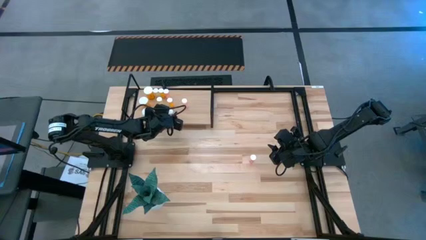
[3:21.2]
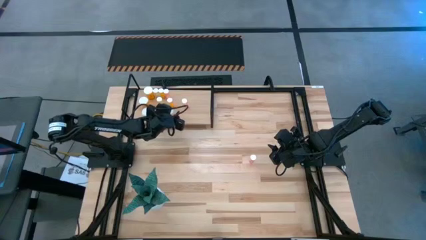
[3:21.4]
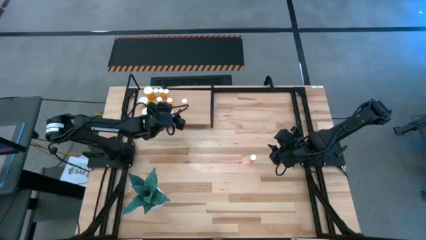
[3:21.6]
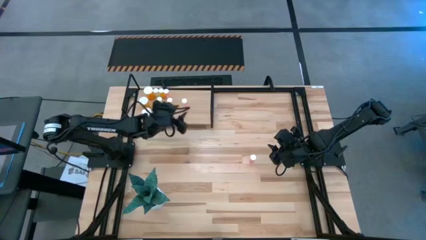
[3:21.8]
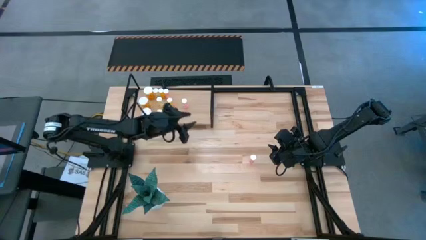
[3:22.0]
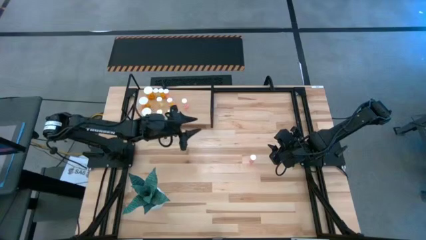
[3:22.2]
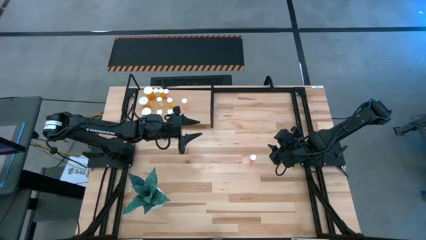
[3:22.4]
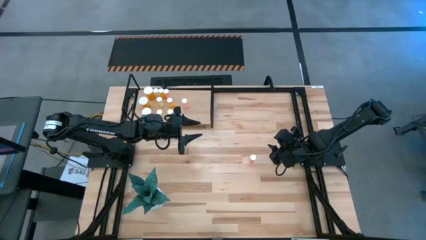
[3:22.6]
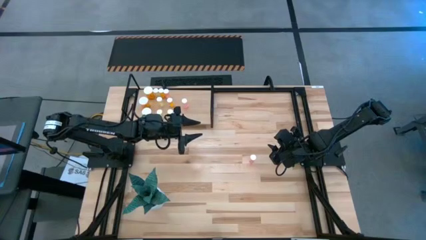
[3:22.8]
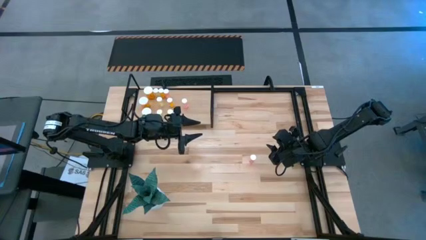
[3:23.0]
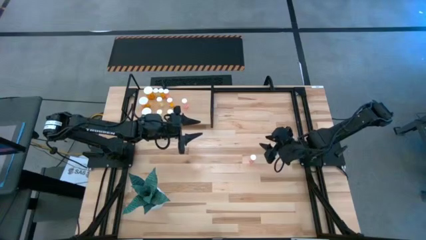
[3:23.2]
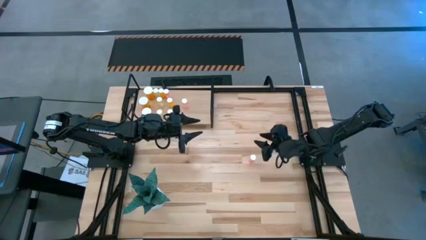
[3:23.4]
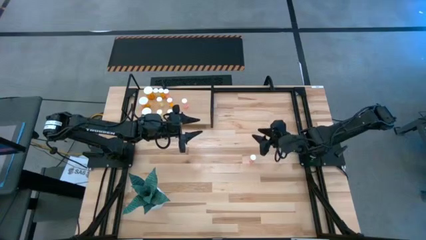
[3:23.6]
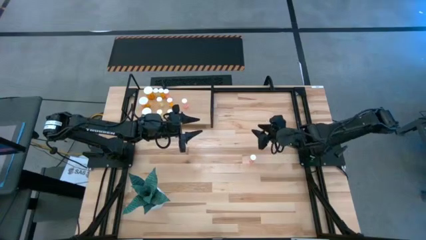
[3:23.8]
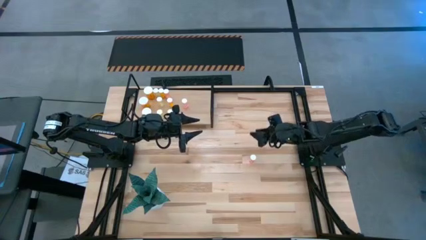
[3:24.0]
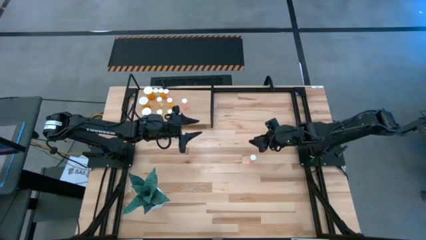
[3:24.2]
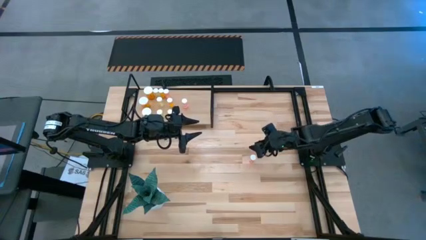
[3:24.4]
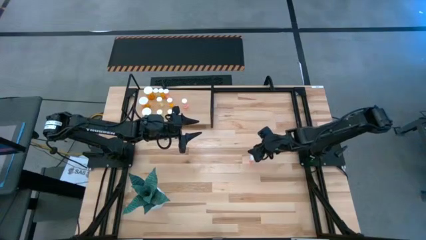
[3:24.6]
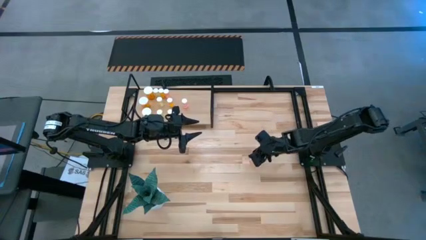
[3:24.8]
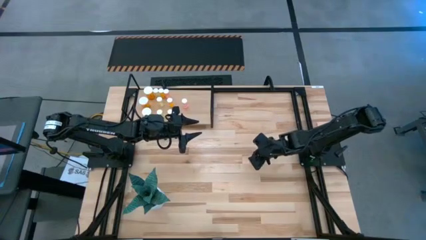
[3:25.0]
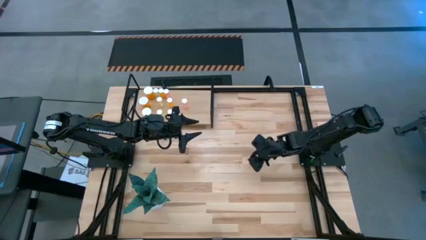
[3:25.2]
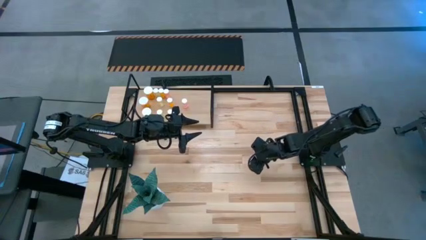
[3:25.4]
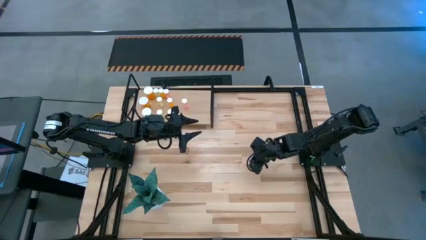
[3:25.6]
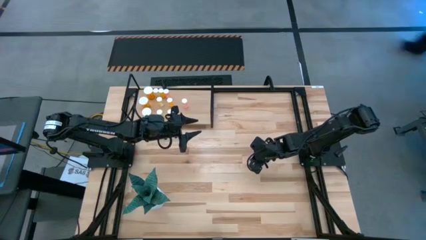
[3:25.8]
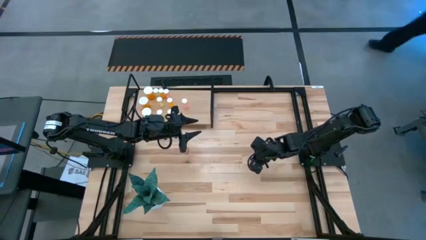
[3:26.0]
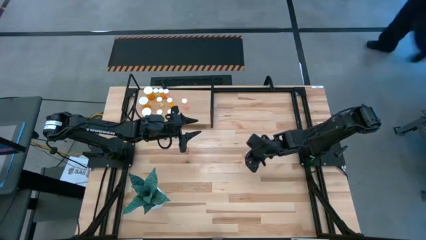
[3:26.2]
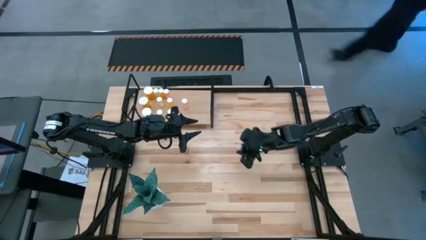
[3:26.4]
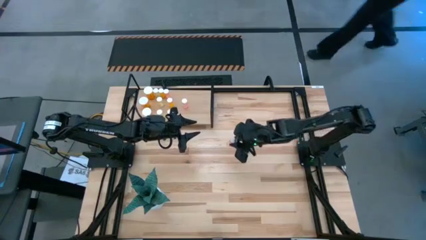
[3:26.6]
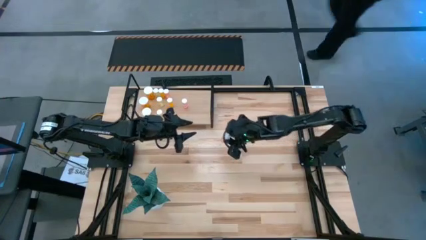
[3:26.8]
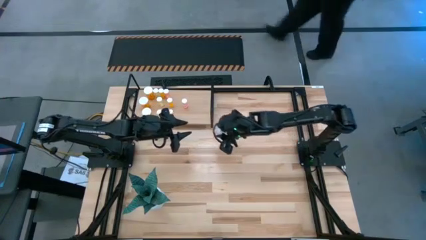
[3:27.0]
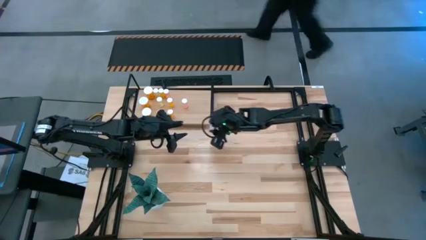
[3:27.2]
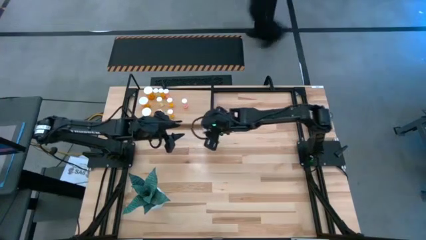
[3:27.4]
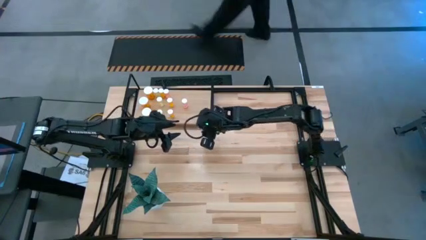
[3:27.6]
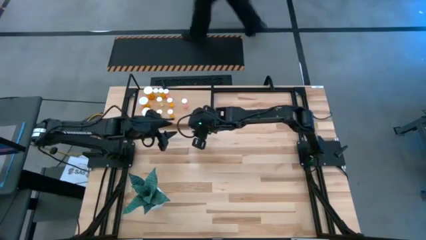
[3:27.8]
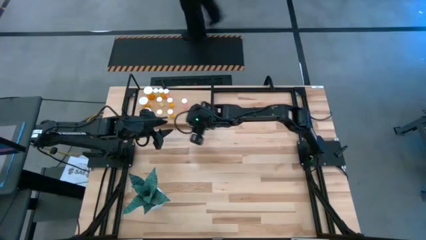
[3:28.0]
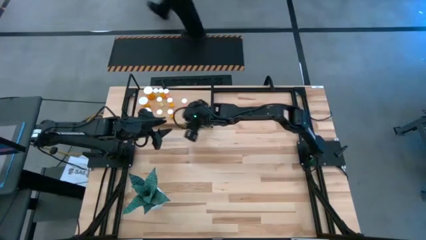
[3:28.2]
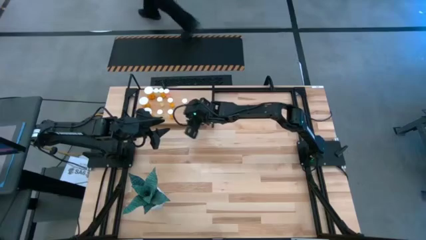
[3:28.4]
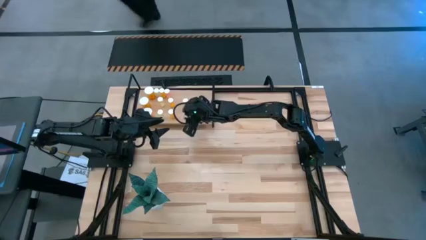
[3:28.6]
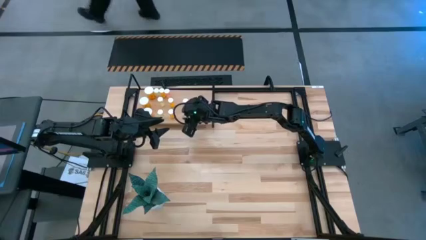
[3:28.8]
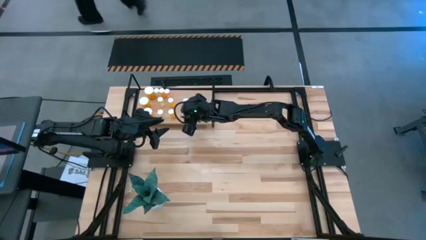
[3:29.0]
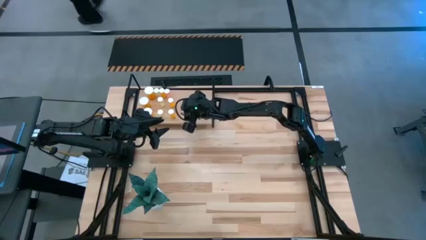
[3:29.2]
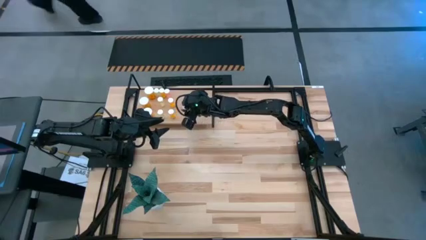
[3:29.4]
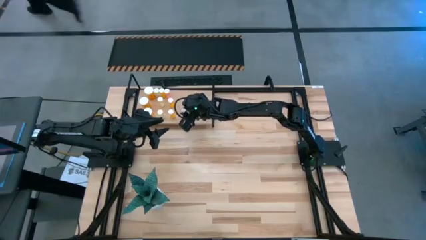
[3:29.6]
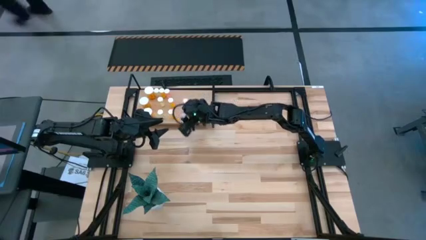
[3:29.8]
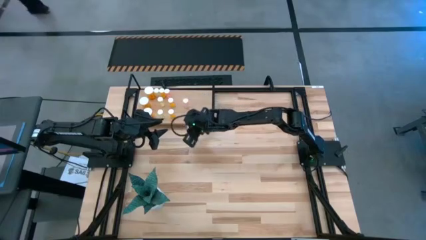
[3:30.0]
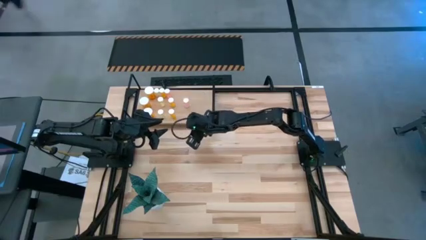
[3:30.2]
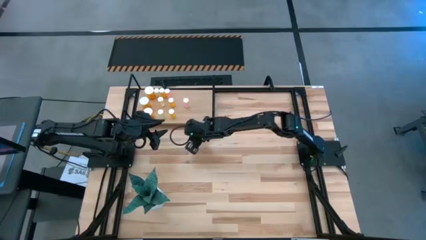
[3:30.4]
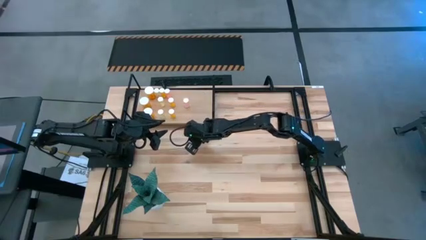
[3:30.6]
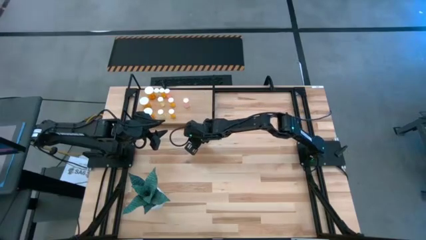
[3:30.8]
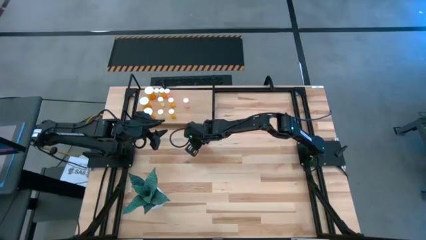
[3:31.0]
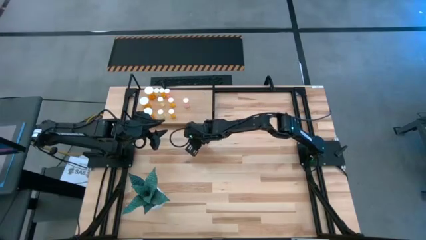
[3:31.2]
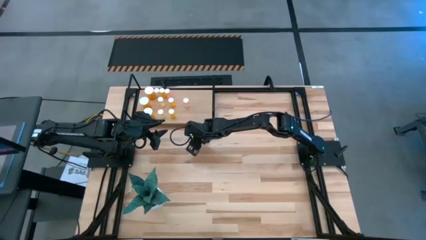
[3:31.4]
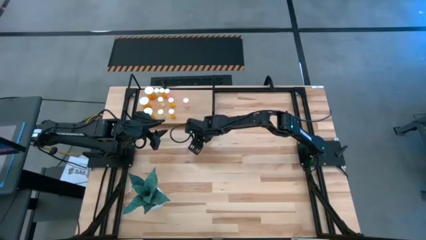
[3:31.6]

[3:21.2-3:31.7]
Task: Pick and place medicine bottles onto shelf by color
Put the pink pill bottle aligned with the other pink pill bottle on the shelf
